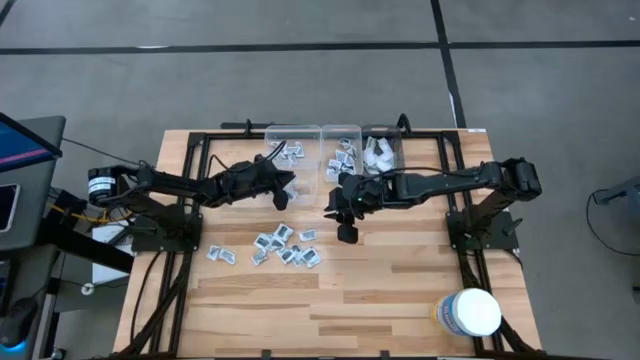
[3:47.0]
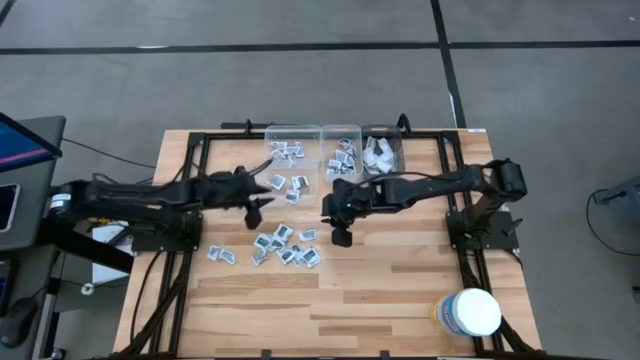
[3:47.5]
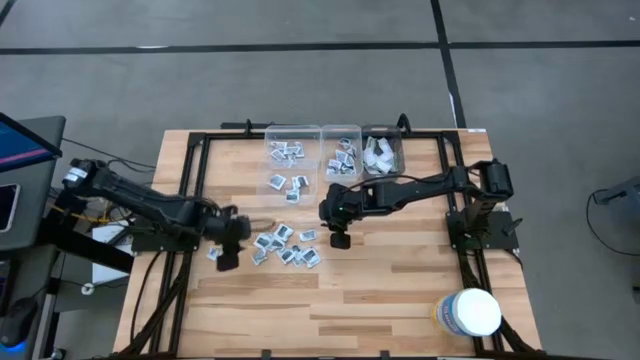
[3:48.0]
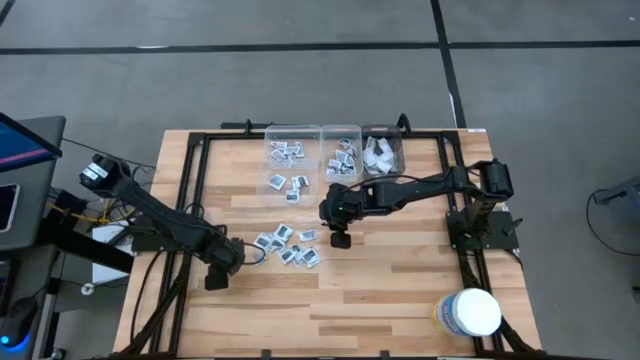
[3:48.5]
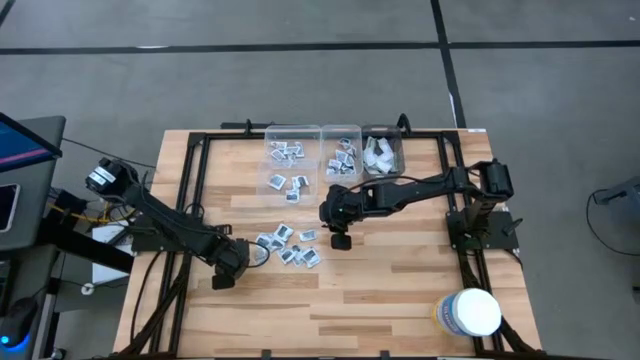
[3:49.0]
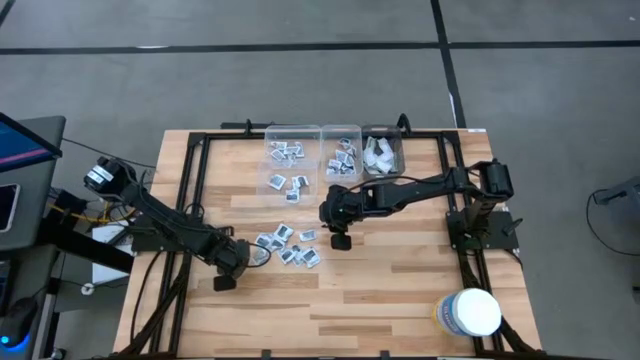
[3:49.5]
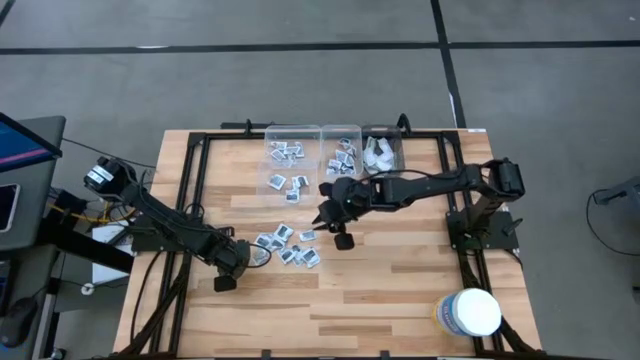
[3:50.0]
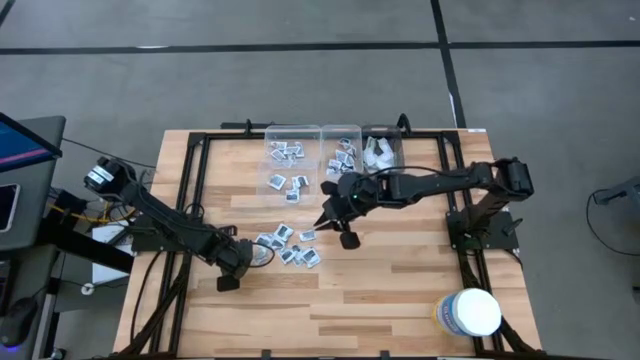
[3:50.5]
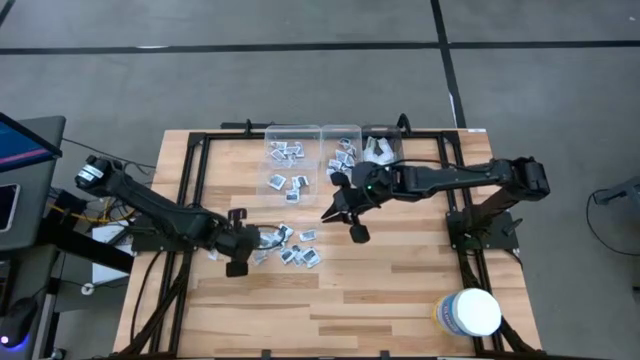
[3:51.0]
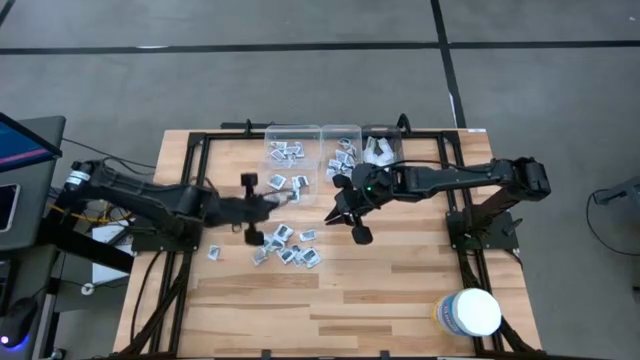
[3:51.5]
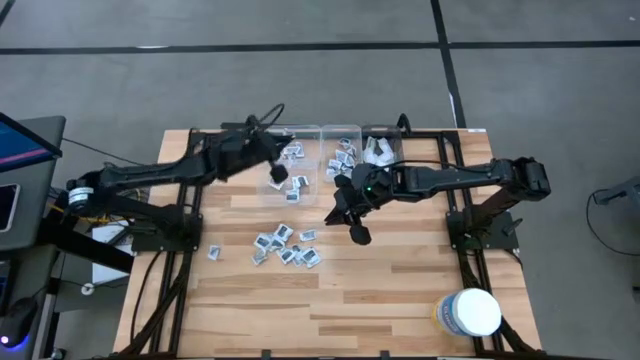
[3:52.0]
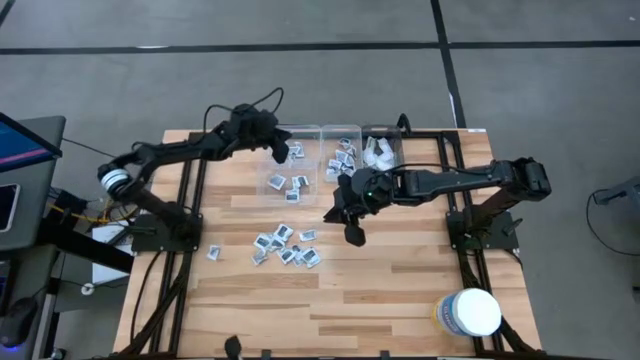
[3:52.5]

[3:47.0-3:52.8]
Task: Pick & Place First Aid Supplies
Put the ointment pack into the top left transparent bin

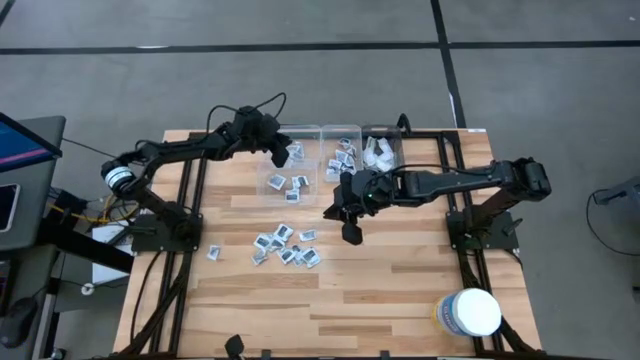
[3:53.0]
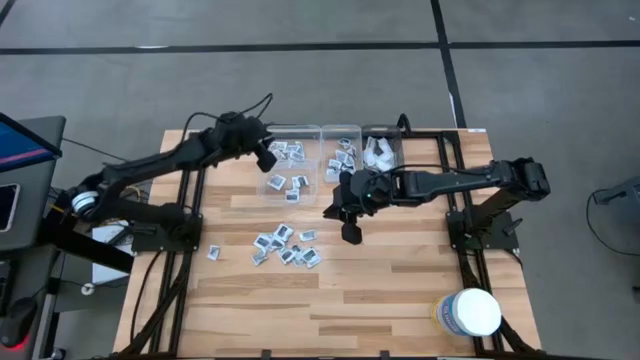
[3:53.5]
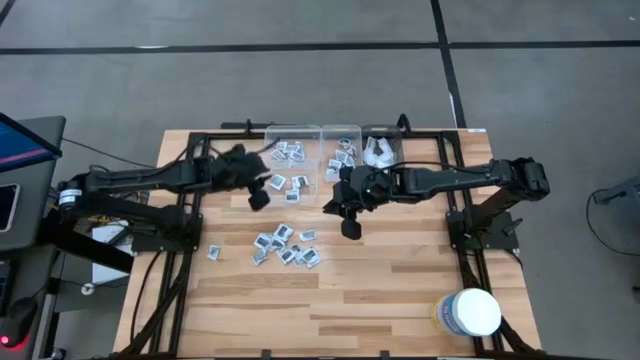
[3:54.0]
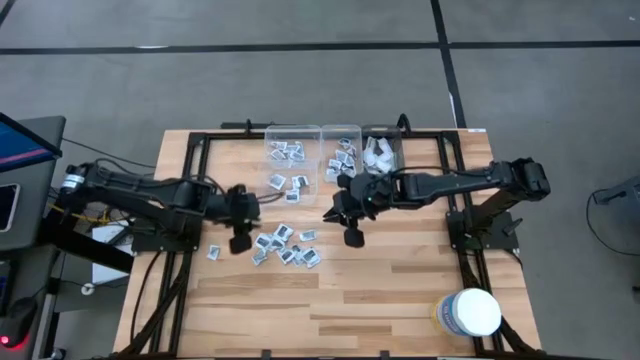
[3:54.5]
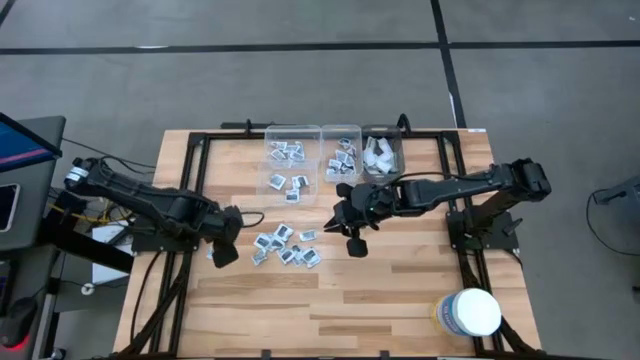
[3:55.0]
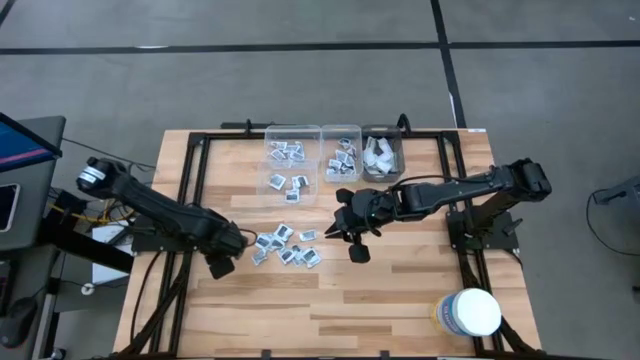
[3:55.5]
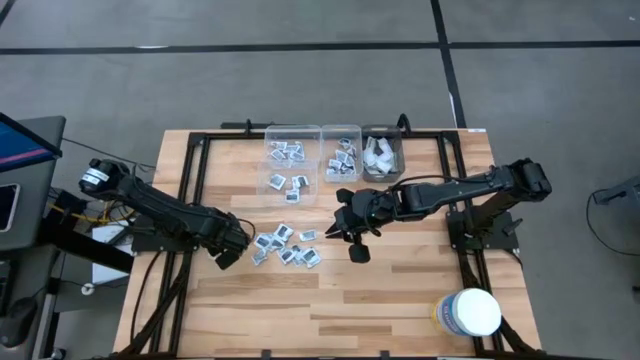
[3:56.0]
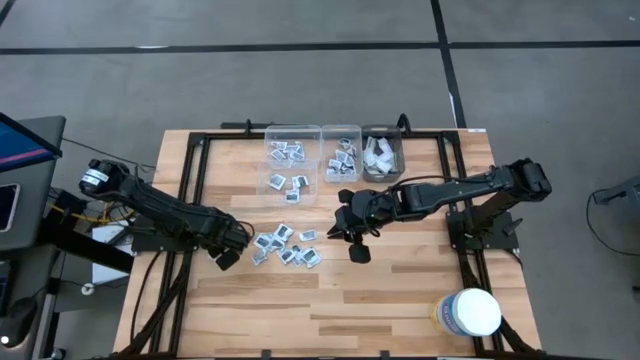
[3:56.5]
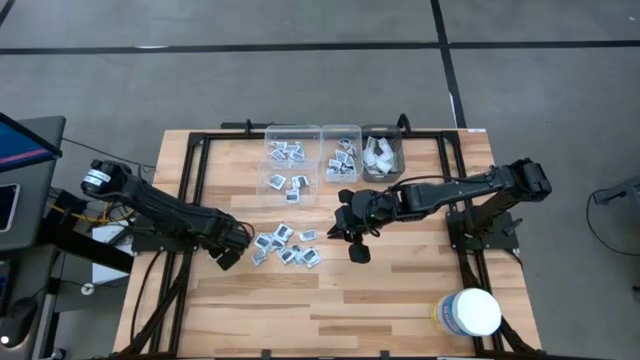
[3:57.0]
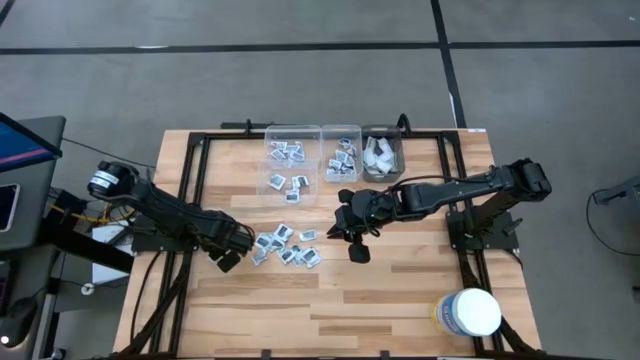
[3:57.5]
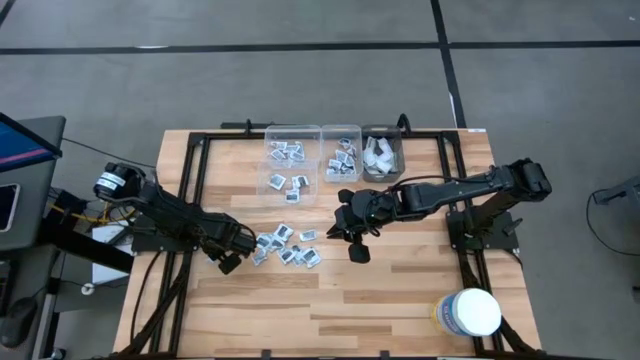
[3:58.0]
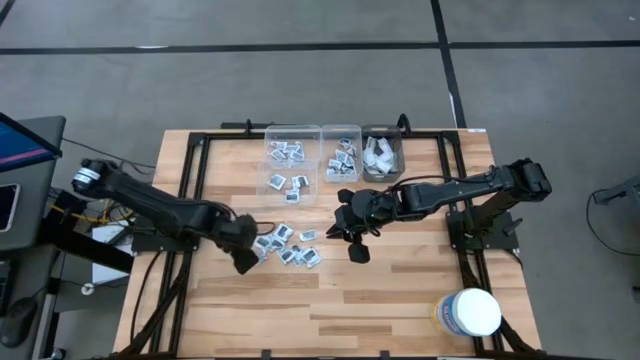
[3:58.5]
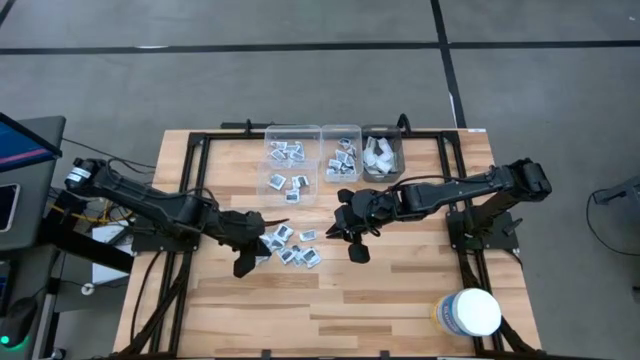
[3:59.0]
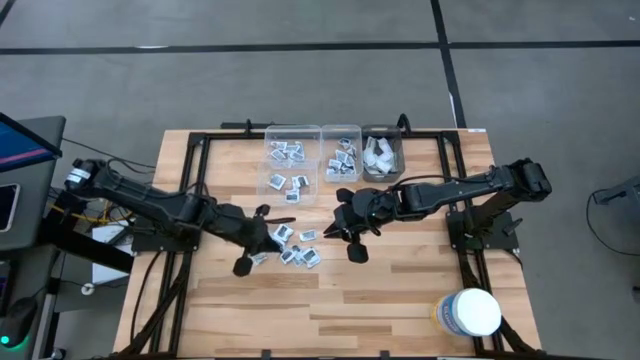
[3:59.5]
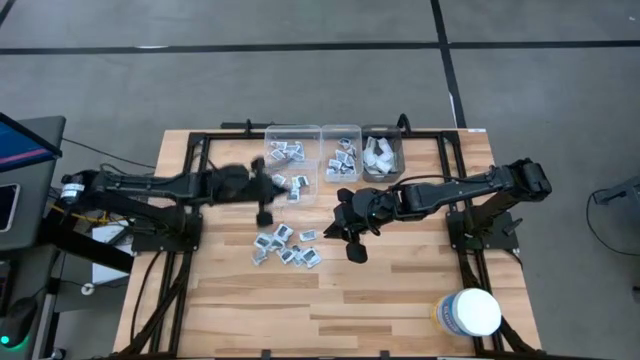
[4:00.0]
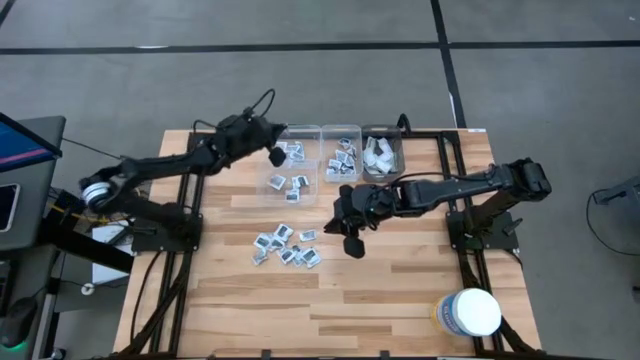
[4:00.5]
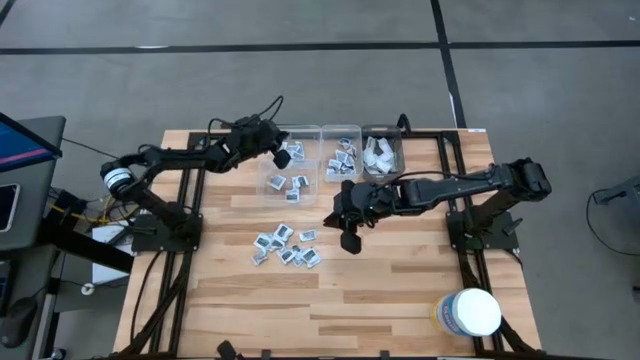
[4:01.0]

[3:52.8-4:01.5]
Put the ointment pack into the top left transparent bin

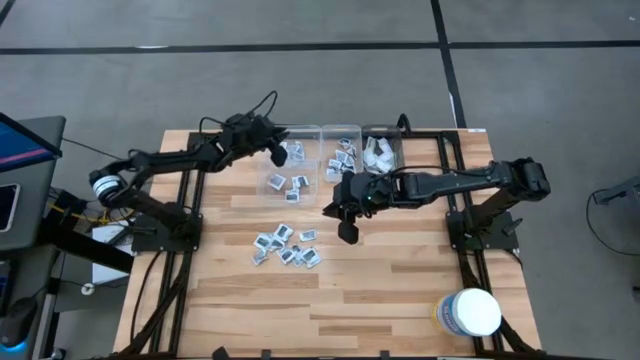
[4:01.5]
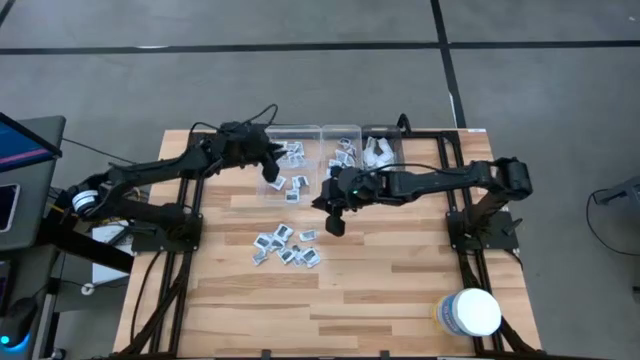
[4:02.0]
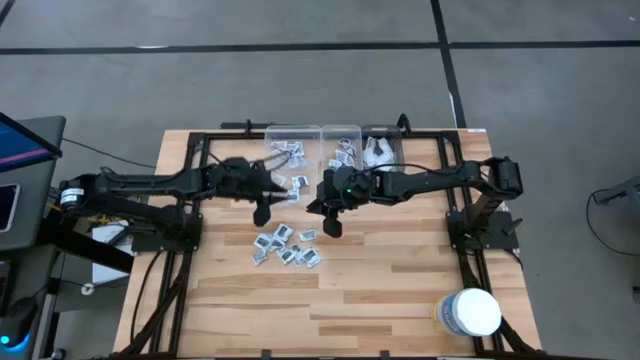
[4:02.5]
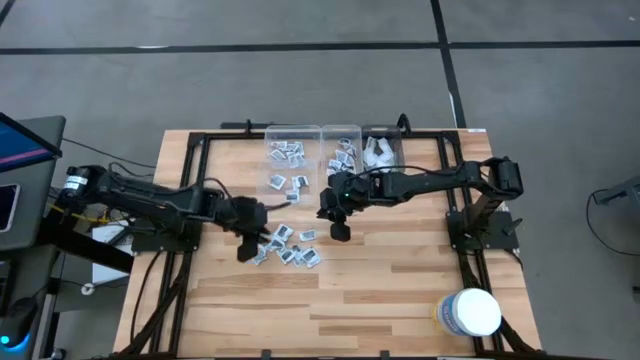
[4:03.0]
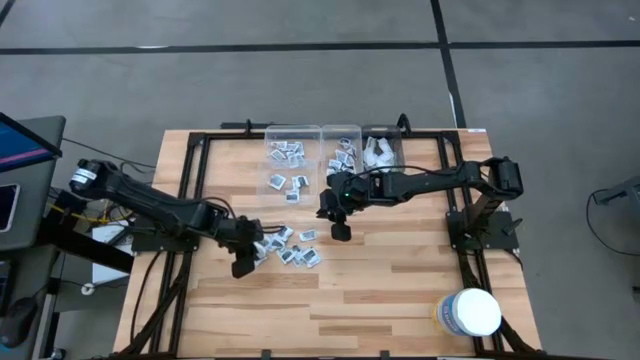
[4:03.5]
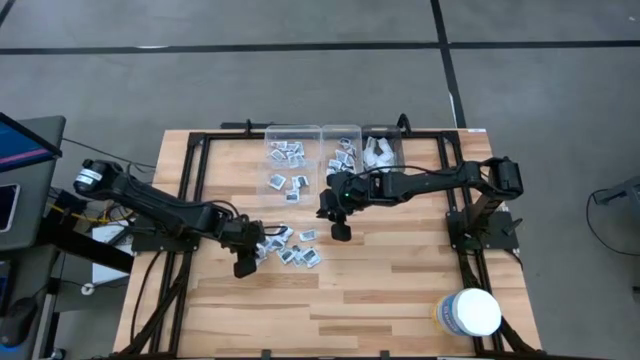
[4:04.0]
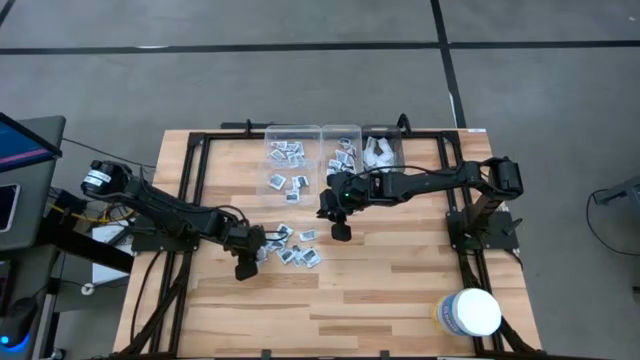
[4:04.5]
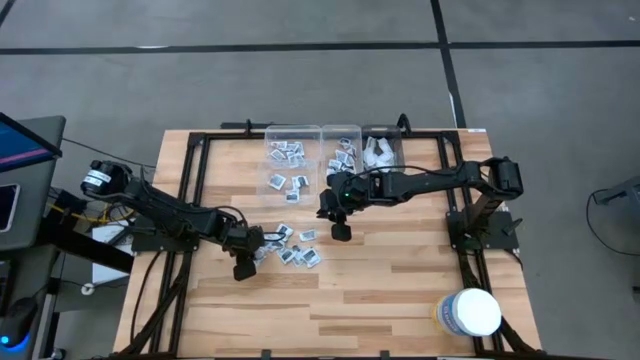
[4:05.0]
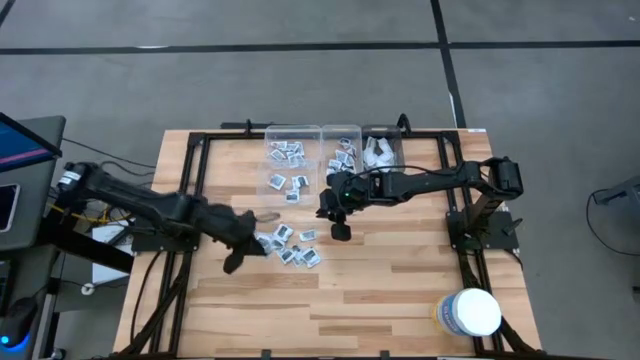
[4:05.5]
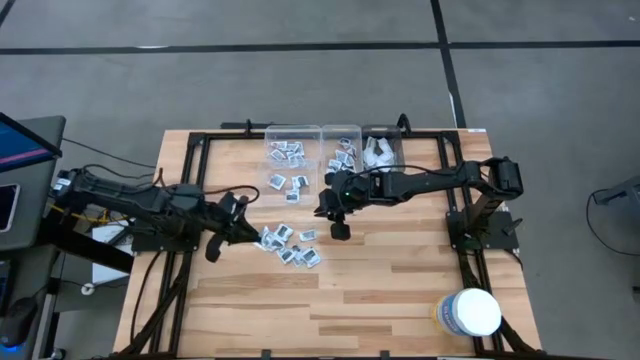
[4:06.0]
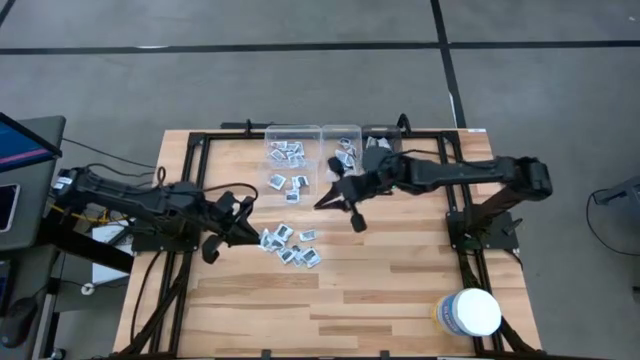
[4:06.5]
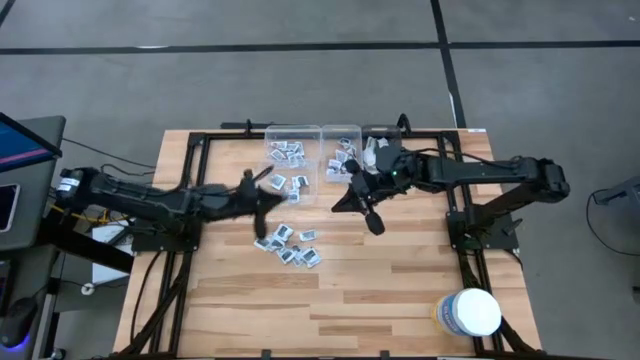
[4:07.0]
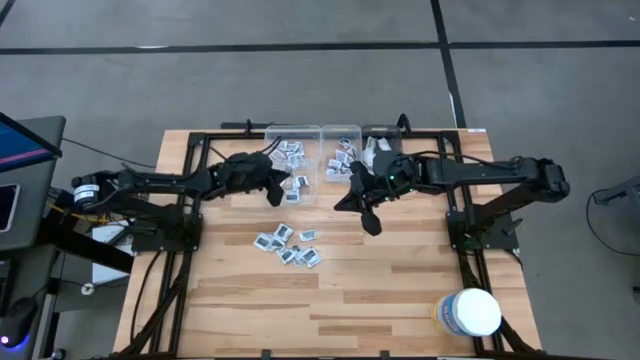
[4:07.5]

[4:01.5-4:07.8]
Put the towelette pack into the bottom transparent bin

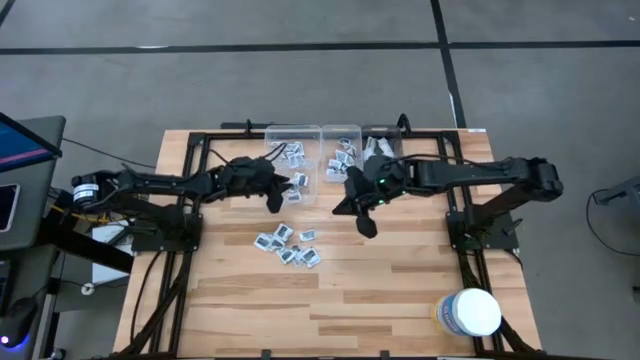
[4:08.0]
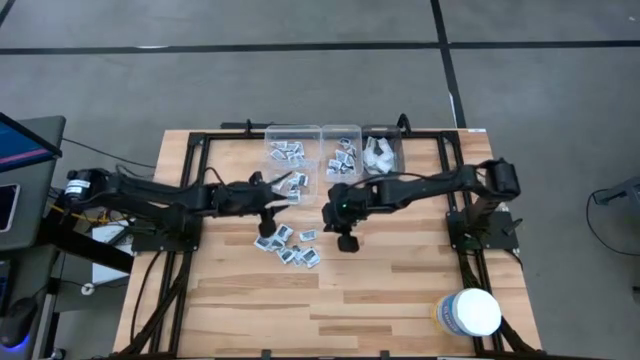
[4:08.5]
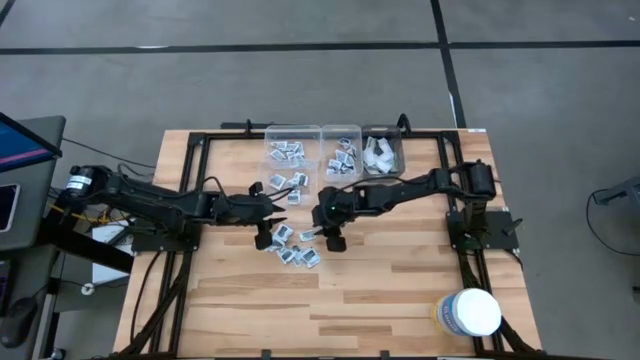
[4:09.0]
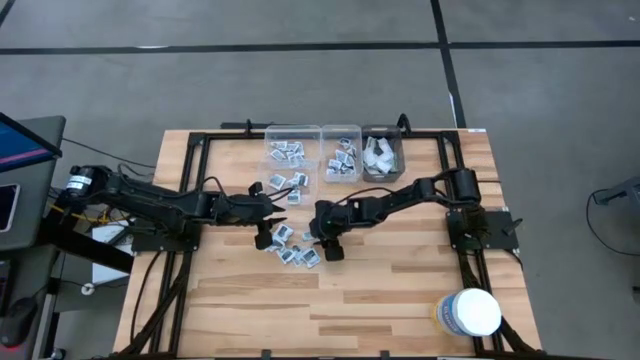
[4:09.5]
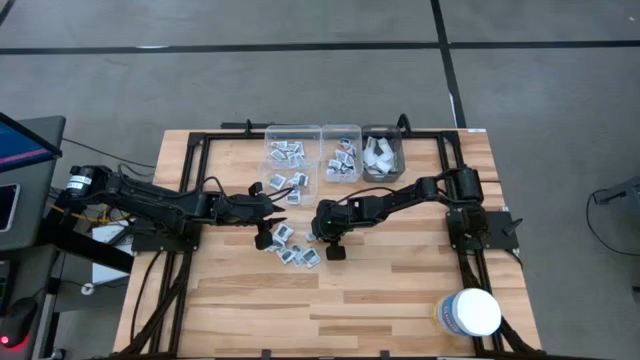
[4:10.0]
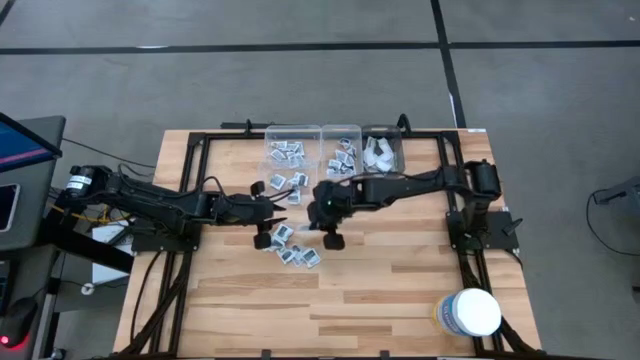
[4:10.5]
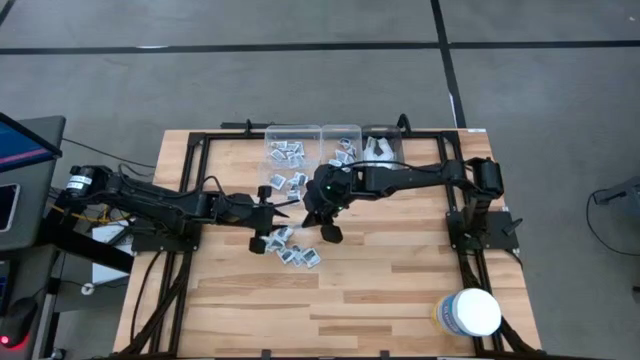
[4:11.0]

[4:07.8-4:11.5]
Put the ointment pack into the top left transparent bin
